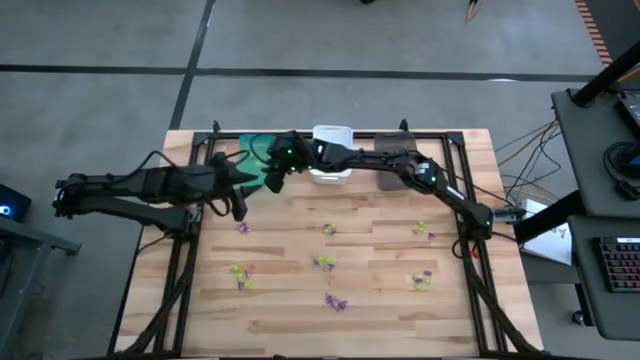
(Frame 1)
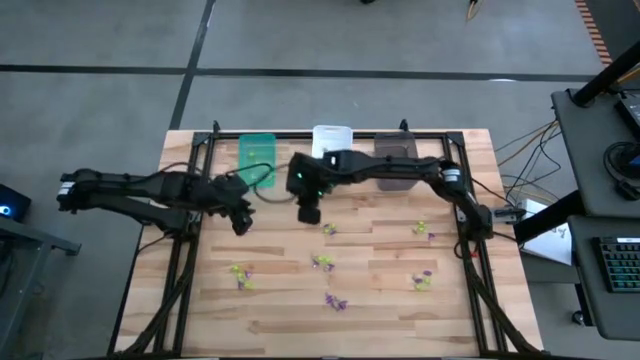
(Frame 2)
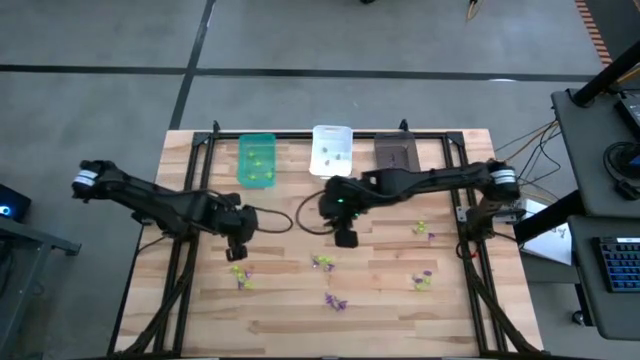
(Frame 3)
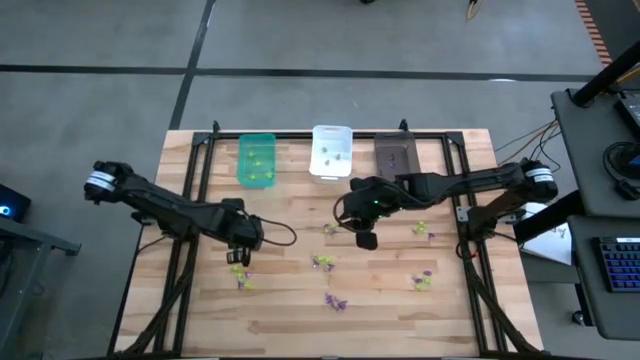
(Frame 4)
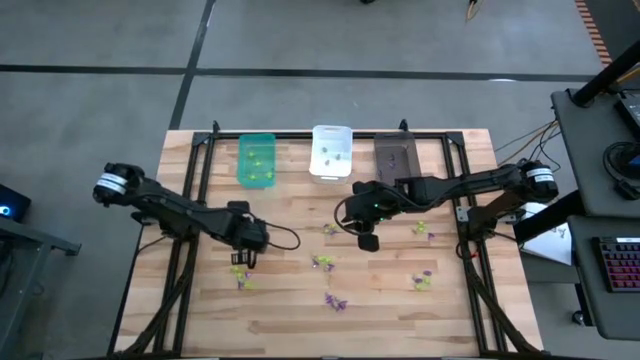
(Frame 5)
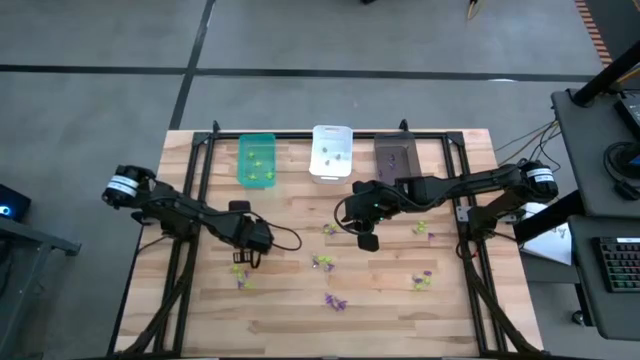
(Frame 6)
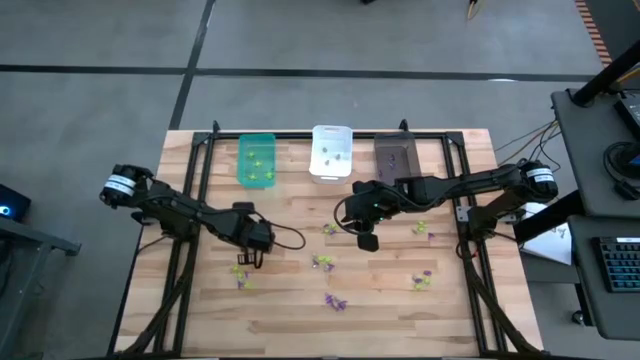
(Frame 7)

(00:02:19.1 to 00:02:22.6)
Task: Sort Halloween decoration
Put the purple witch hat toy into the gray bin

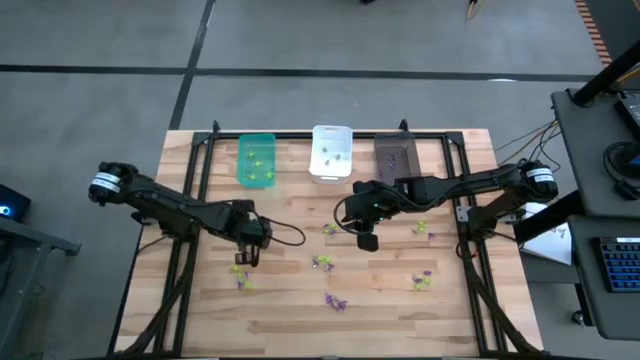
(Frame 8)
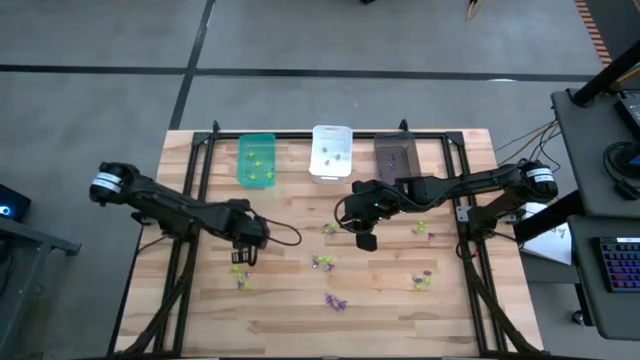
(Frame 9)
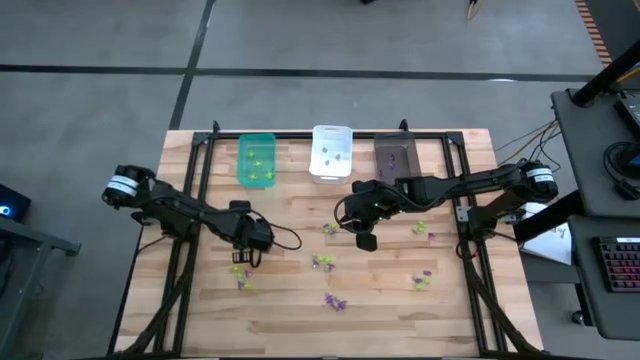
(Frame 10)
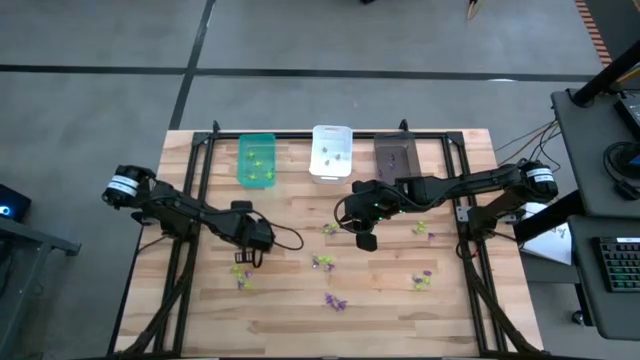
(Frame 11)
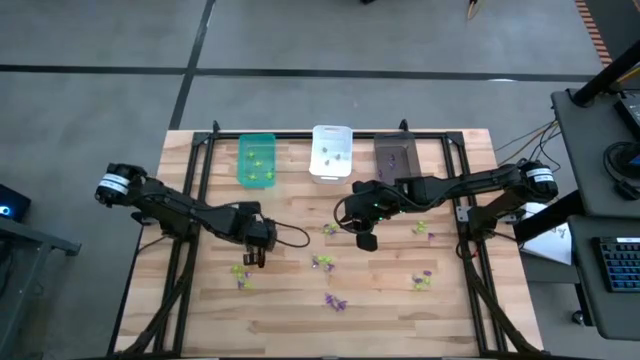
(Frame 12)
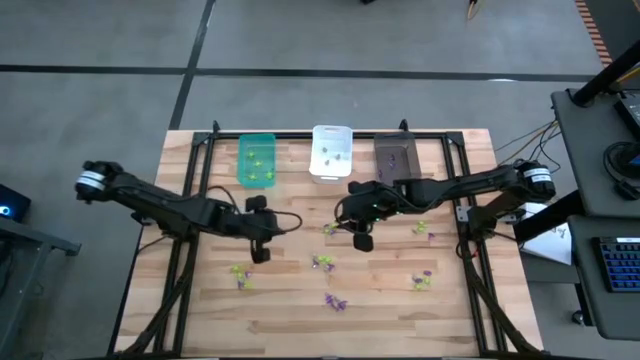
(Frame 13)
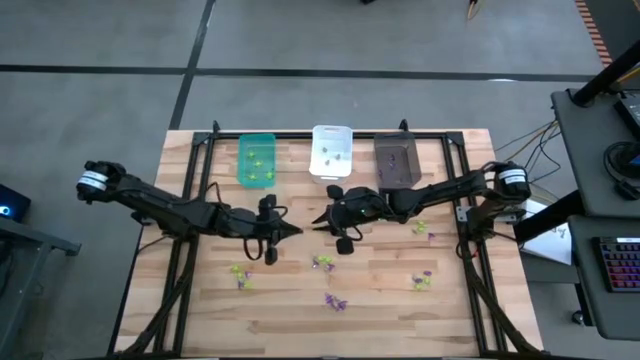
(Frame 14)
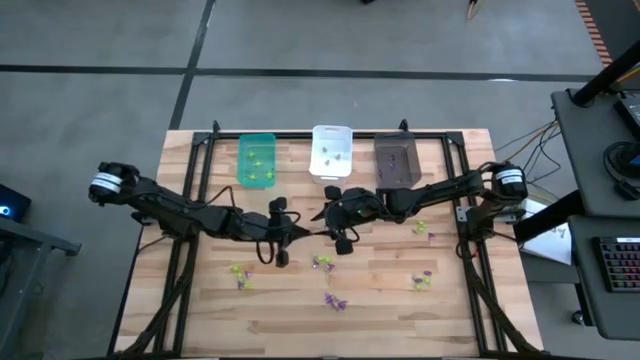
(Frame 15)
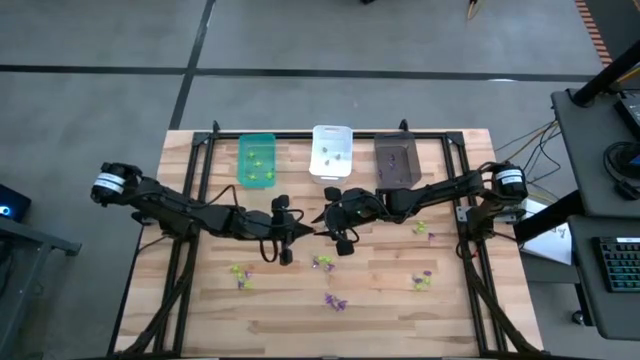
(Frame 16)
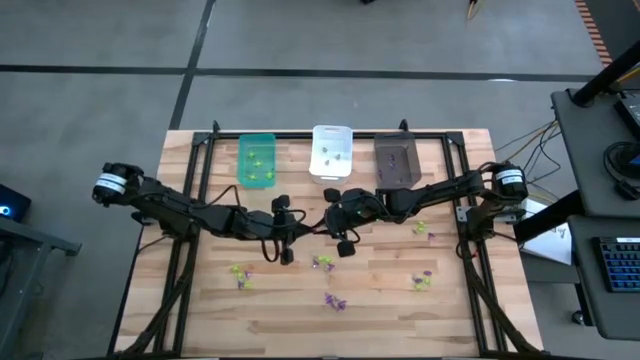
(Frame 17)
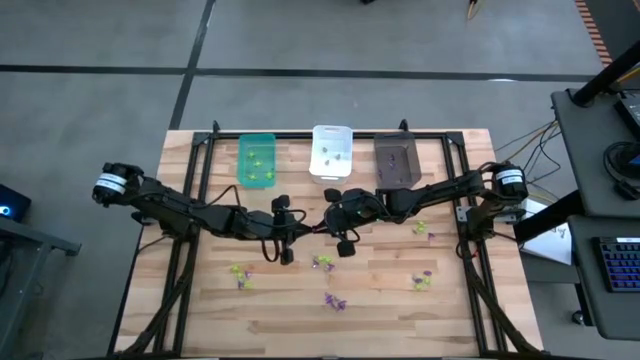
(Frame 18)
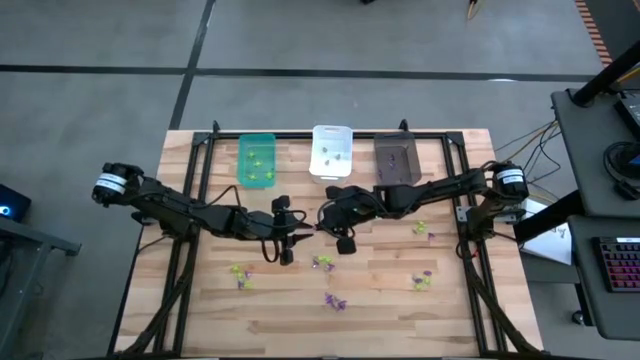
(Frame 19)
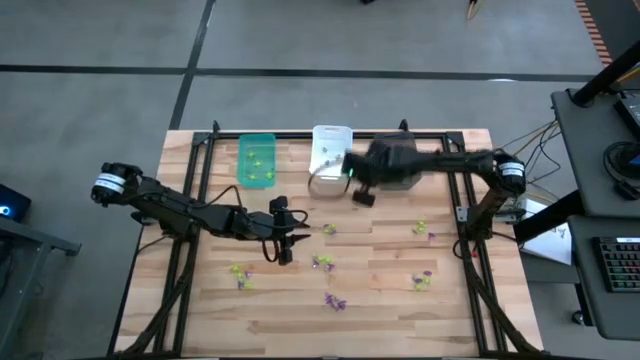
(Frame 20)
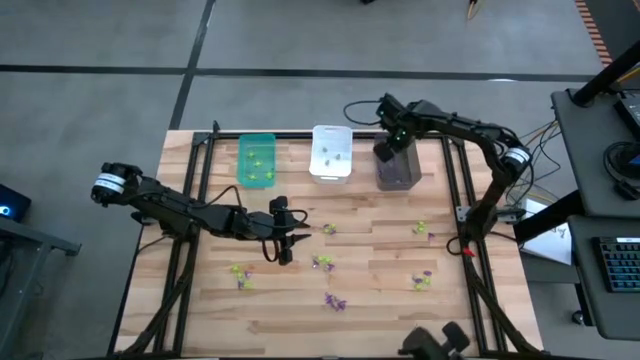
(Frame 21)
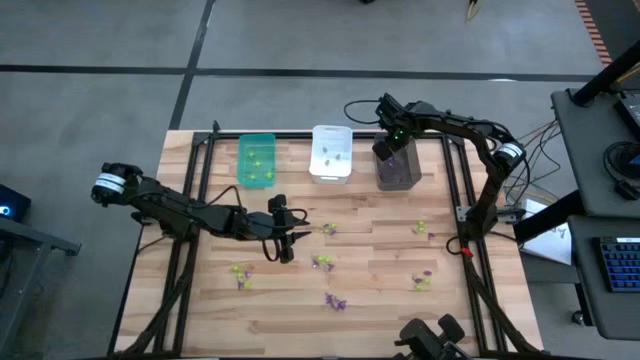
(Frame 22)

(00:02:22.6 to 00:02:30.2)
Put the purple witch hat toy into the gray bin

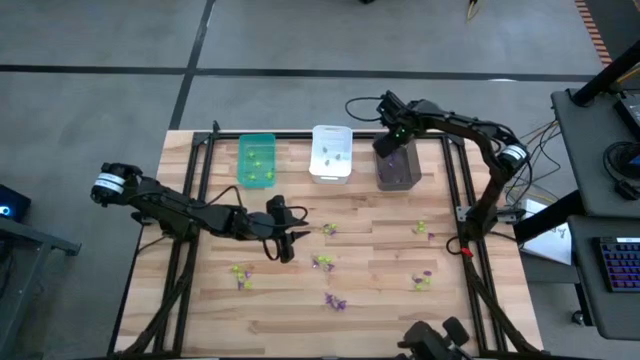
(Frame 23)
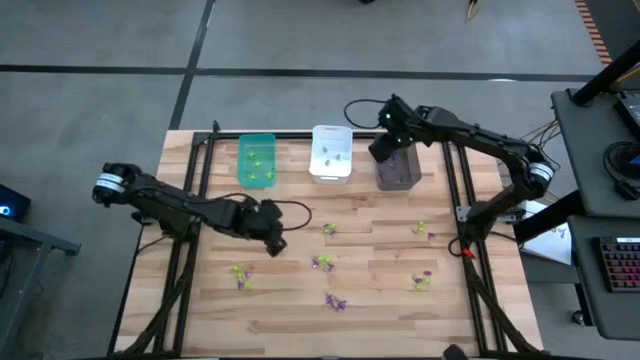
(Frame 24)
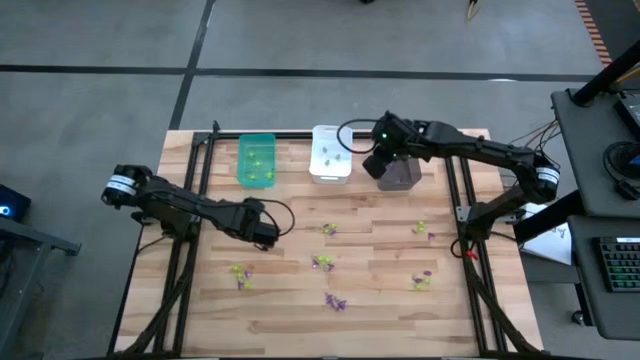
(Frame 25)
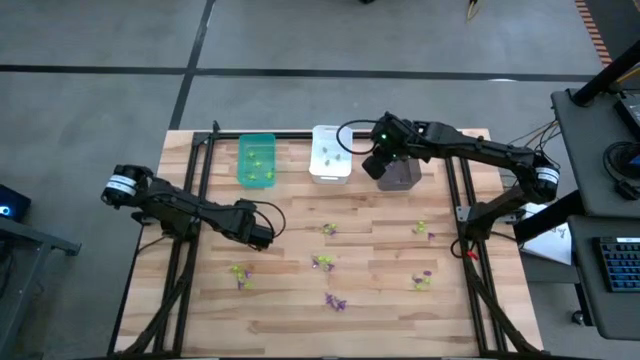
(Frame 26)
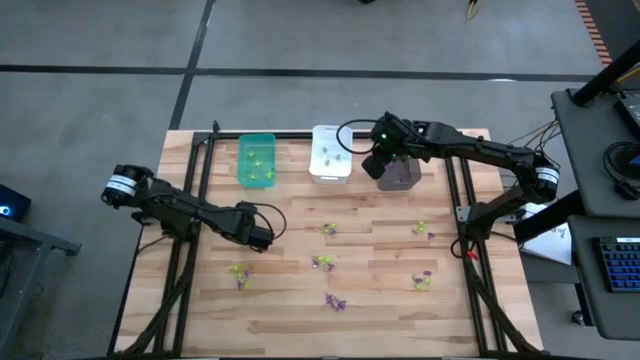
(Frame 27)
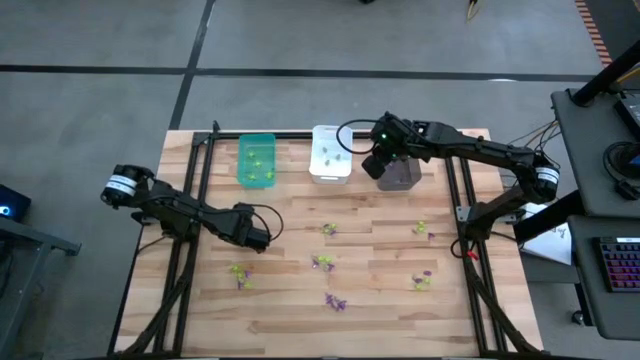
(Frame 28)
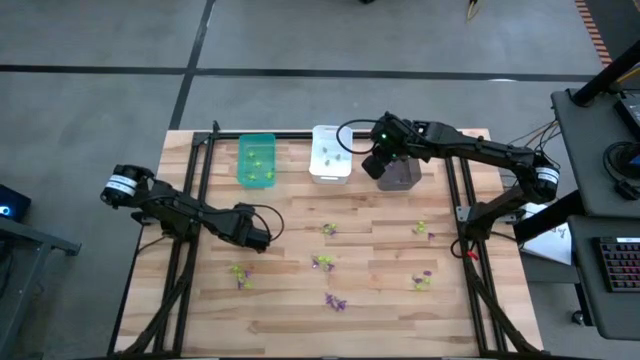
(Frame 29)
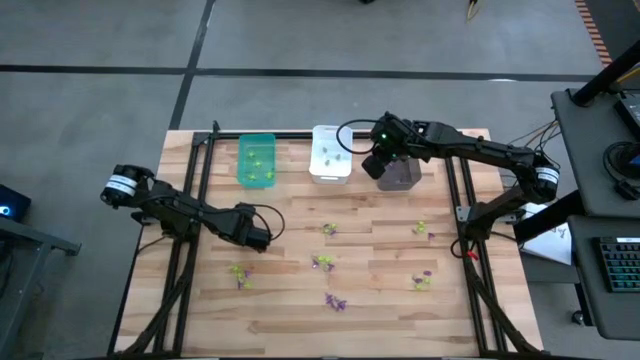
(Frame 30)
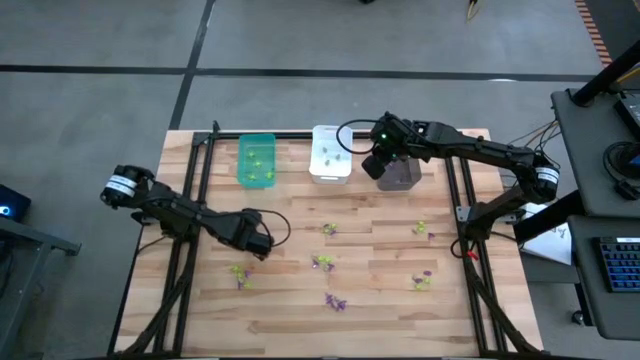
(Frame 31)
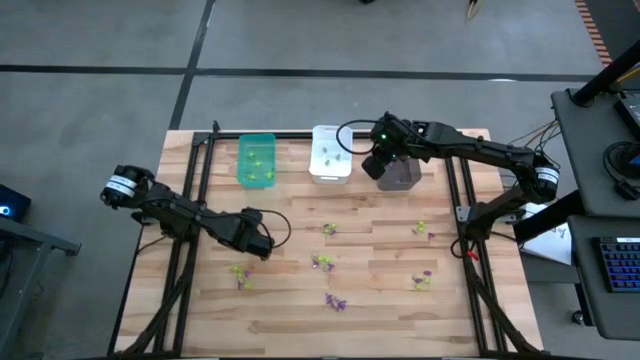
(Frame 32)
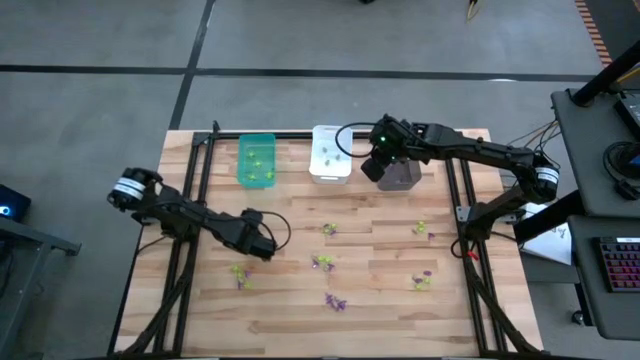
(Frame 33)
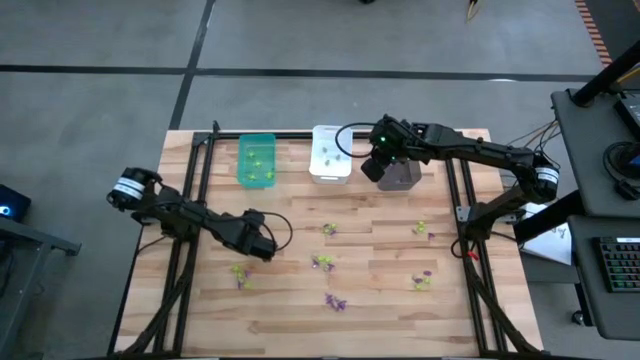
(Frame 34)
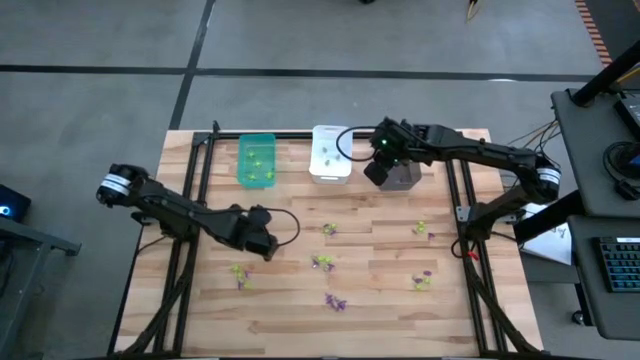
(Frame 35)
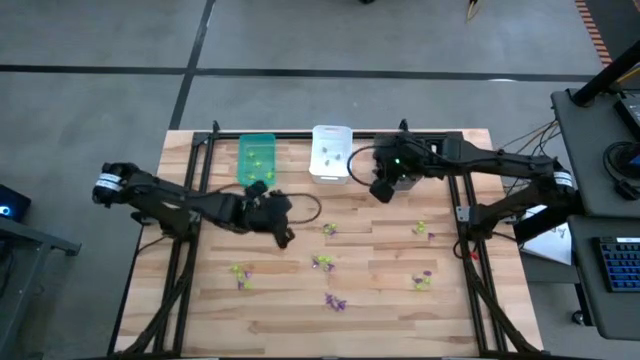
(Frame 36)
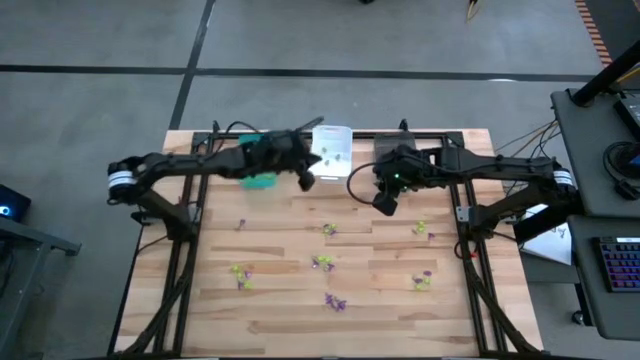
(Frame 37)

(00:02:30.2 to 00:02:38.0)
Put the white skull toy into the white bin
